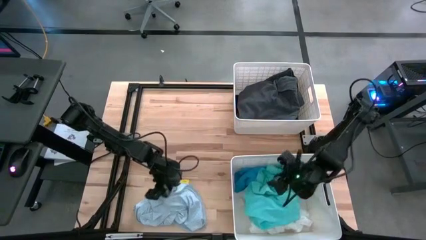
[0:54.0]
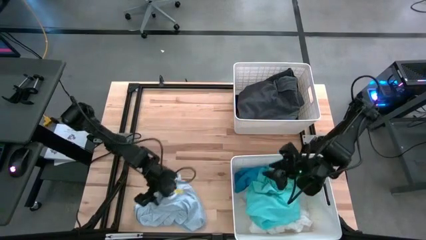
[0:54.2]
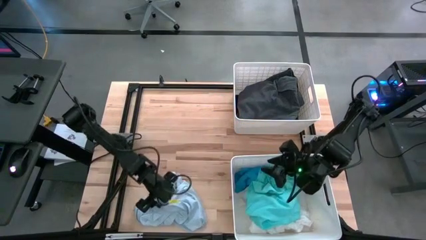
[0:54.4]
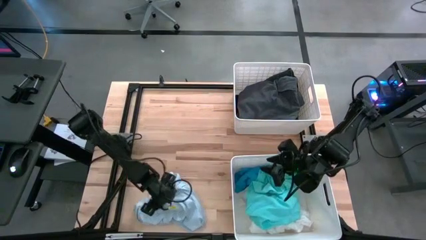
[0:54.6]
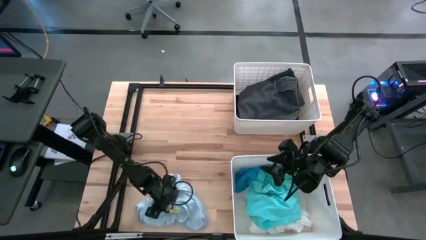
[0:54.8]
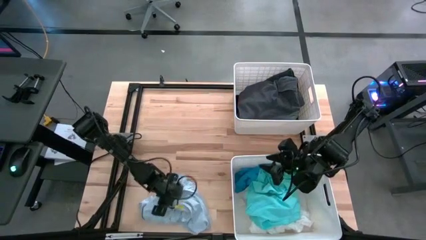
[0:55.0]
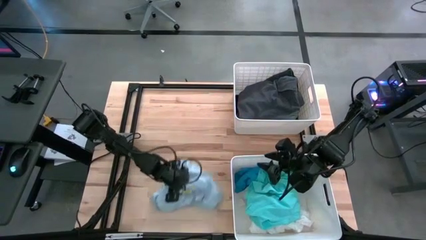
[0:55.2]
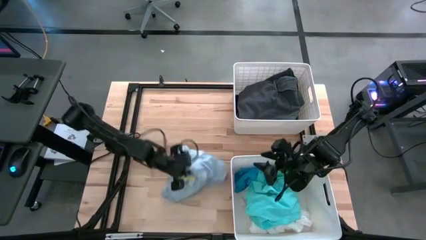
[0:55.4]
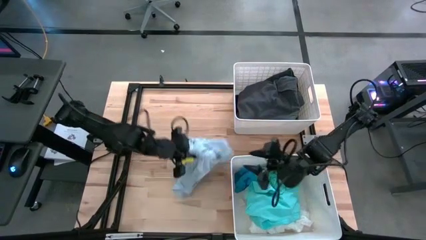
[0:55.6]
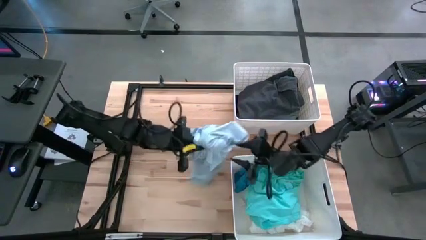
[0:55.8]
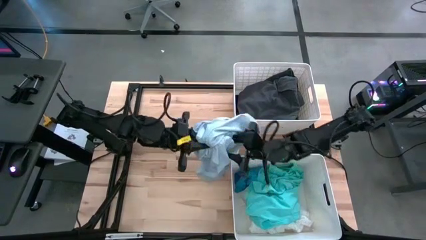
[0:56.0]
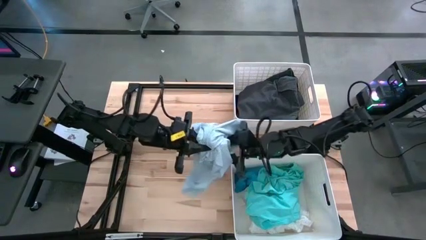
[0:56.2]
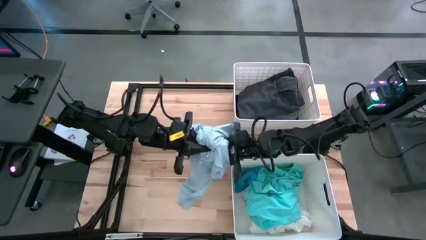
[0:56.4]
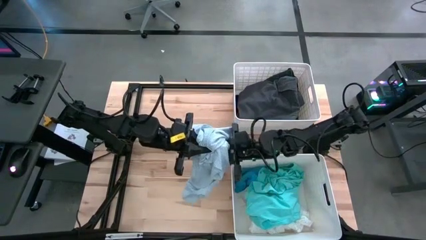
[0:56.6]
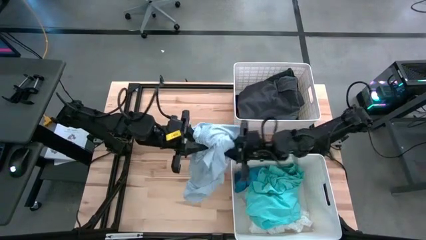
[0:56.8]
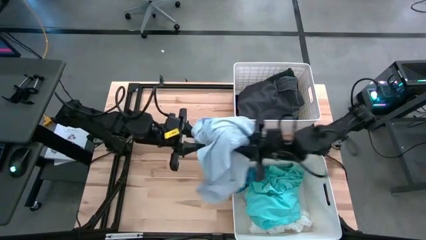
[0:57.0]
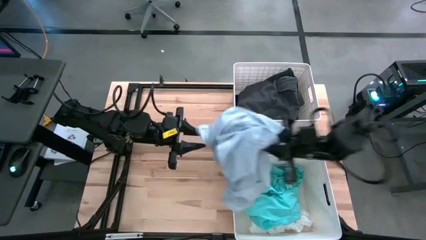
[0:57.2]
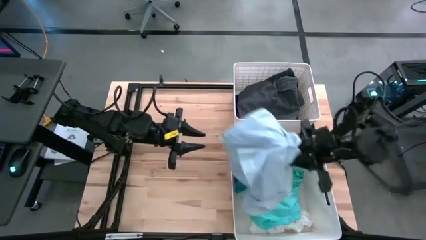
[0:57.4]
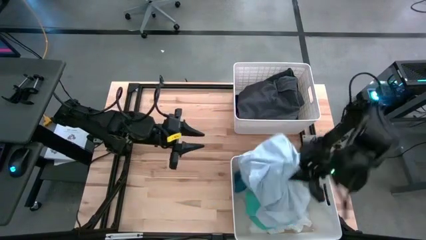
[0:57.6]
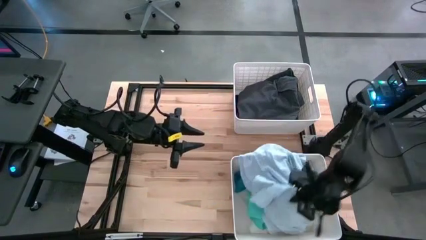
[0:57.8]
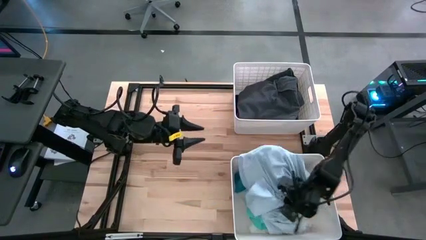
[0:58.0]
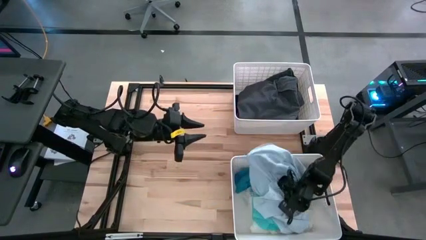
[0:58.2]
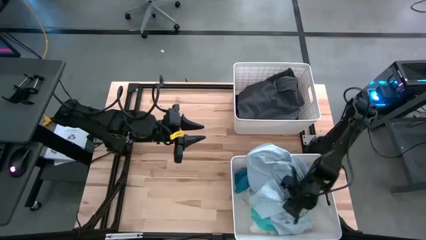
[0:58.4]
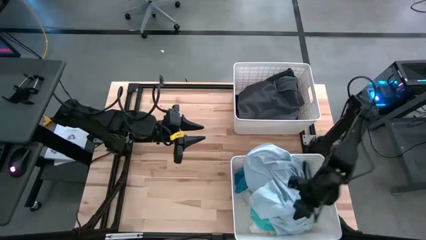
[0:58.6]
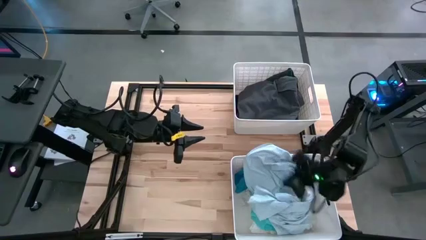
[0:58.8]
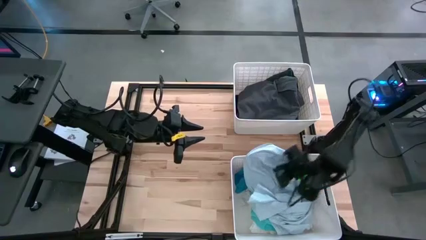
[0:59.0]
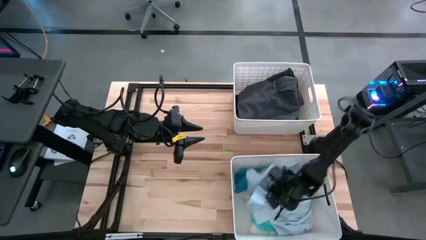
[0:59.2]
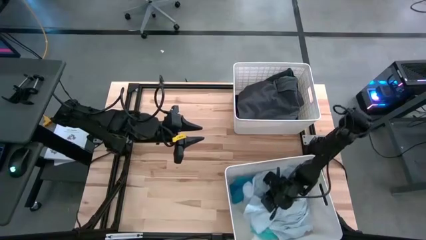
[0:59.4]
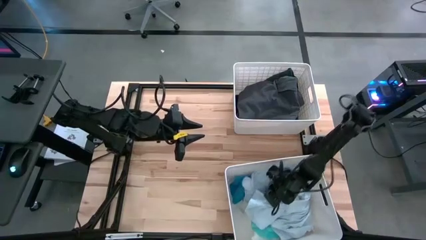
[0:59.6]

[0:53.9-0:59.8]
Task: Sort clothes
Put the white patient gown into the bottom white laundry bin

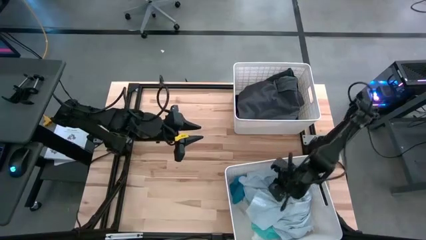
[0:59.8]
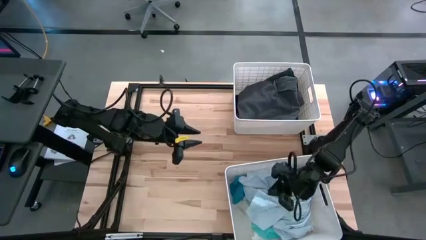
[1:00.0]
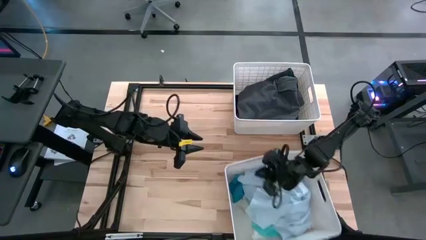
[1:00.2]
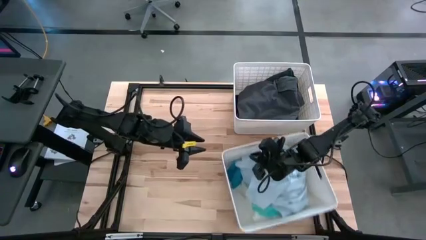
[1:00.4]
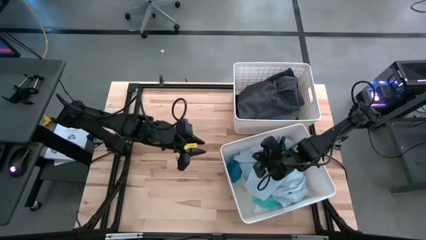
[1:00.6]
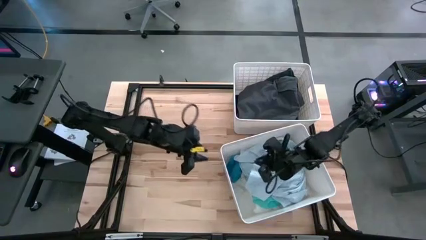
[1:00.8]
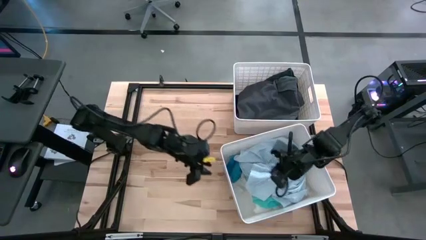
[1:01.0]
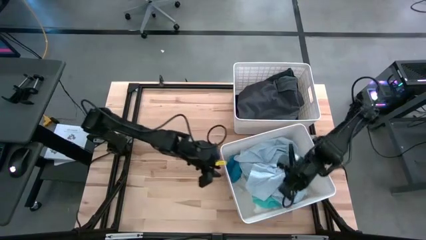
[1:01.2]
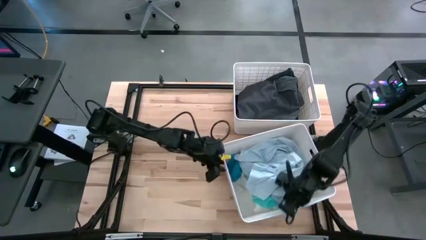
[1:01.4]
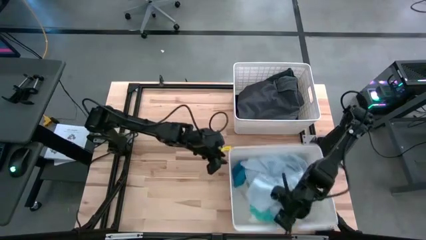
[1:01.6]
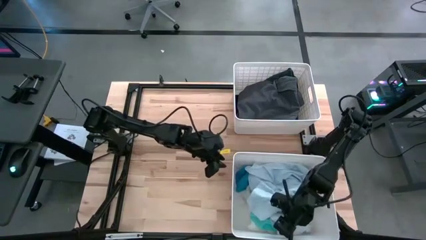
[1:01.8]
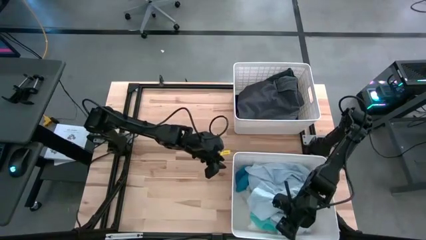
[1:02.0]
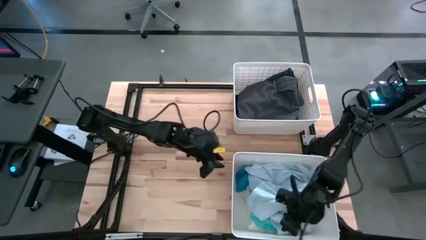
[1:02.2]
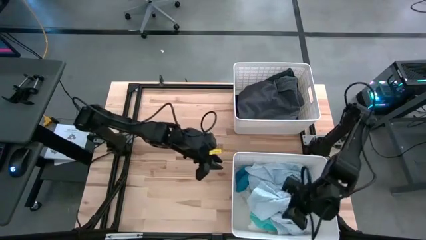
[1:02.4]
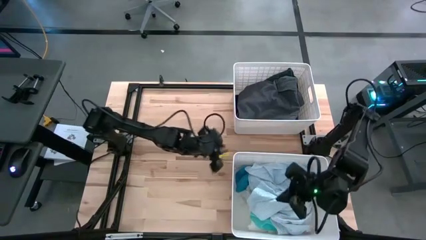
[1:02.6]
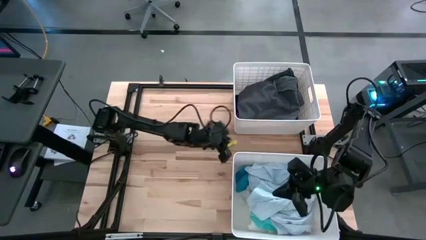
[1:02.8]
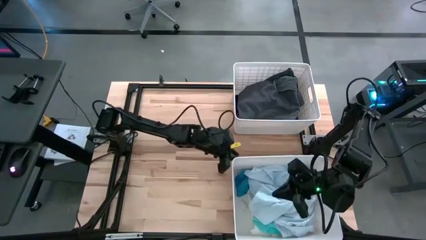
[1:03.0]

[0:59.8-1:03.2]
Adjust the bottom laundry bin

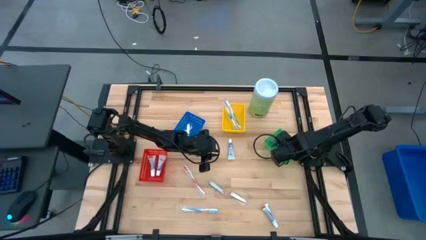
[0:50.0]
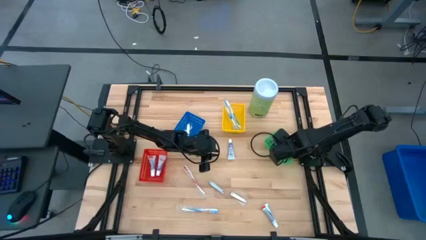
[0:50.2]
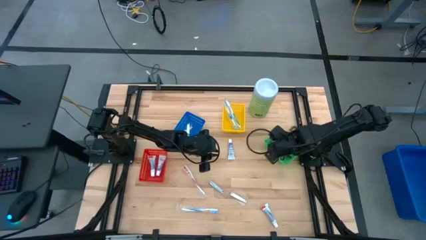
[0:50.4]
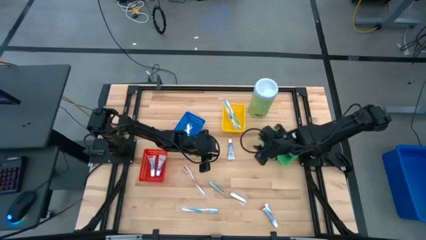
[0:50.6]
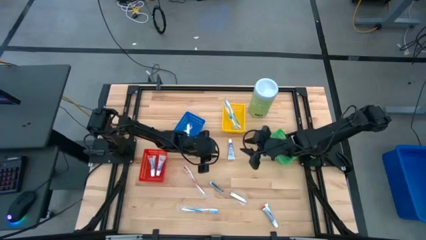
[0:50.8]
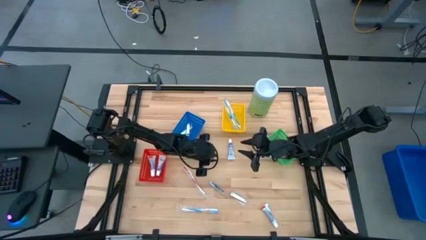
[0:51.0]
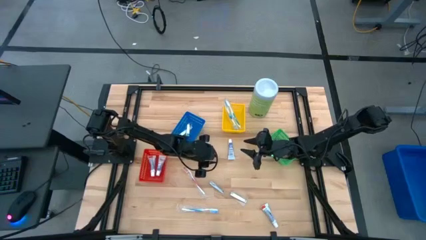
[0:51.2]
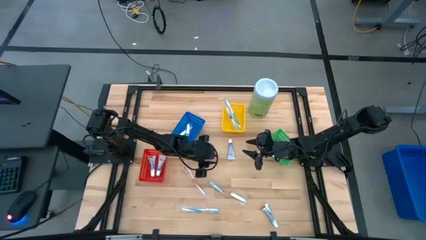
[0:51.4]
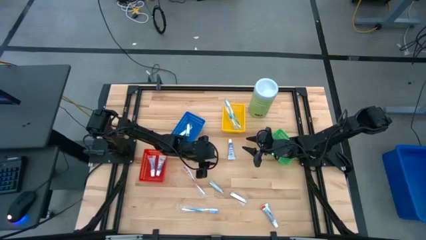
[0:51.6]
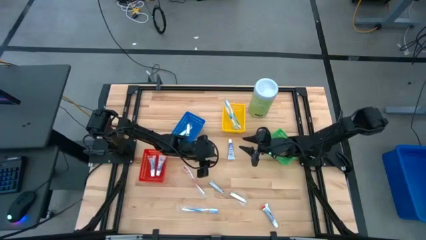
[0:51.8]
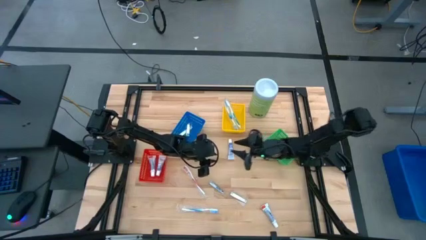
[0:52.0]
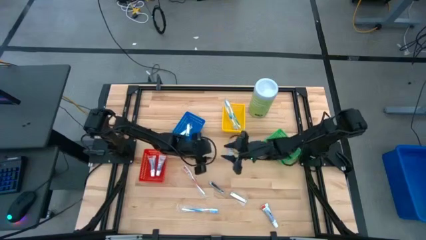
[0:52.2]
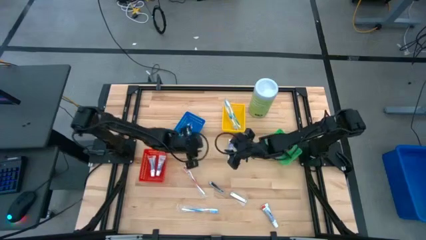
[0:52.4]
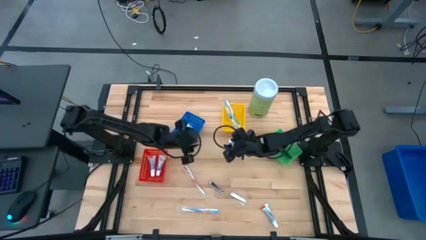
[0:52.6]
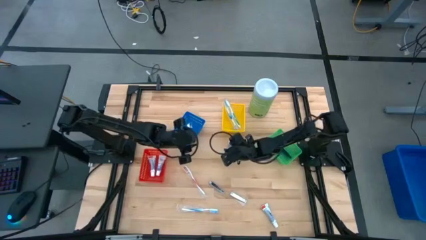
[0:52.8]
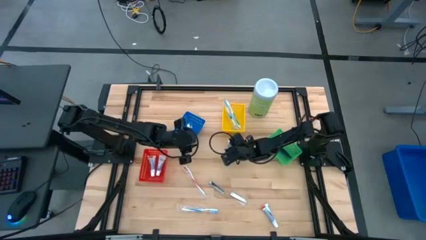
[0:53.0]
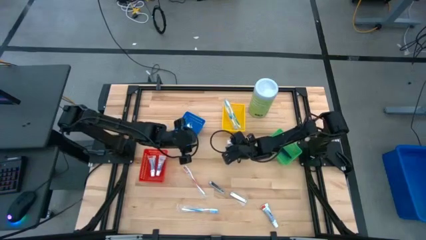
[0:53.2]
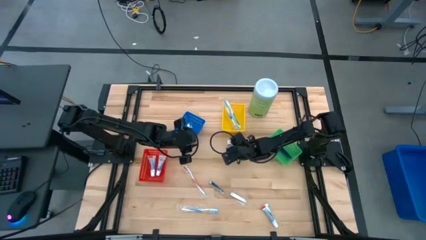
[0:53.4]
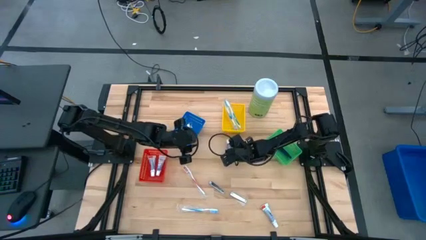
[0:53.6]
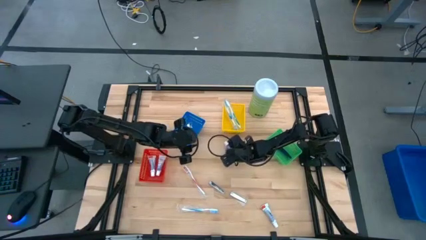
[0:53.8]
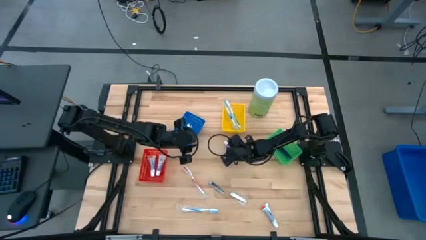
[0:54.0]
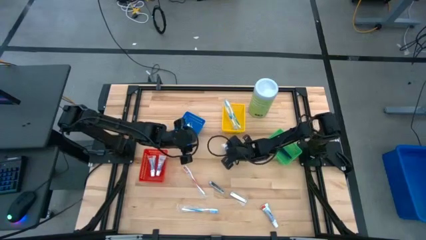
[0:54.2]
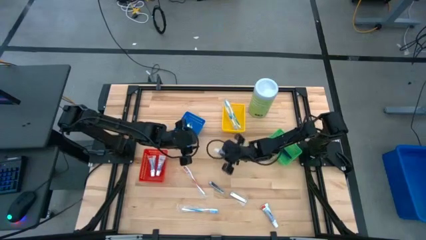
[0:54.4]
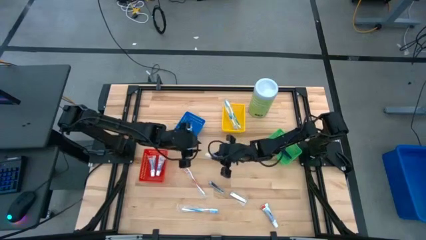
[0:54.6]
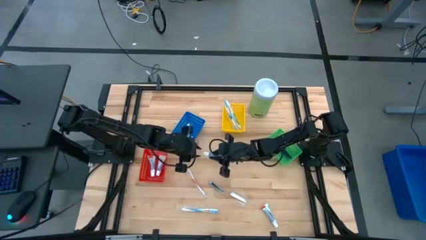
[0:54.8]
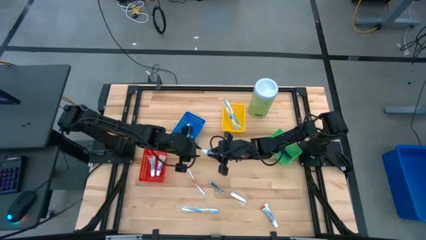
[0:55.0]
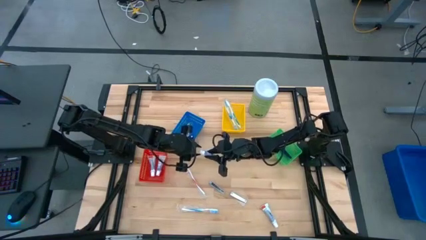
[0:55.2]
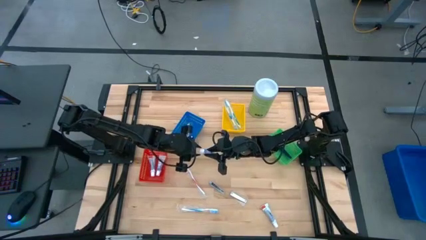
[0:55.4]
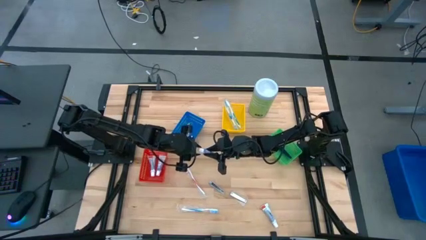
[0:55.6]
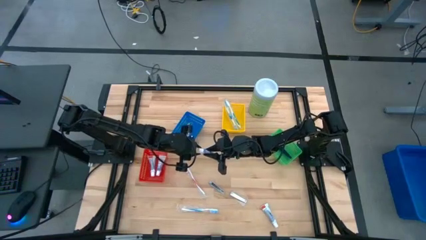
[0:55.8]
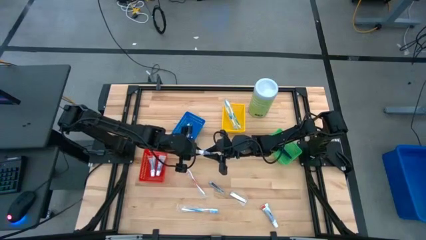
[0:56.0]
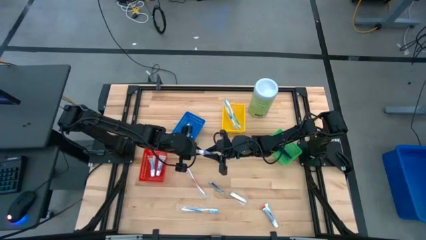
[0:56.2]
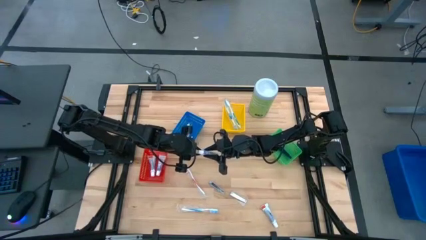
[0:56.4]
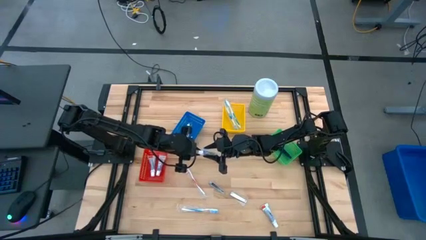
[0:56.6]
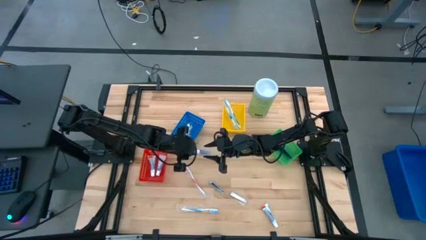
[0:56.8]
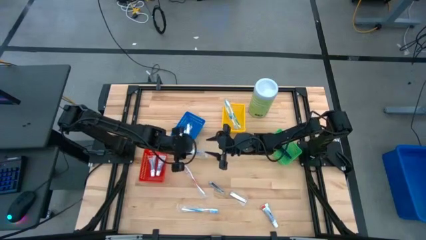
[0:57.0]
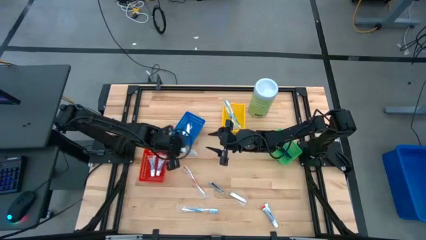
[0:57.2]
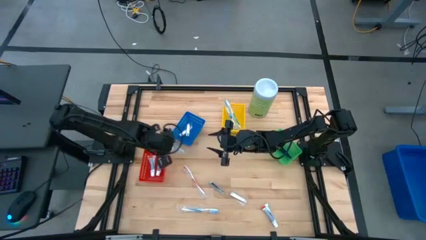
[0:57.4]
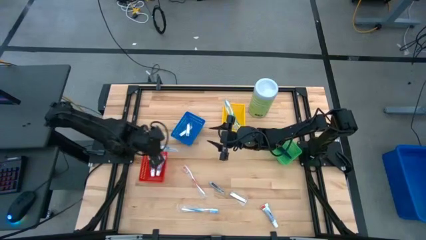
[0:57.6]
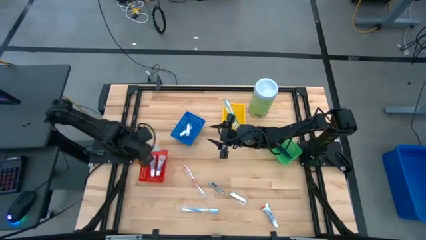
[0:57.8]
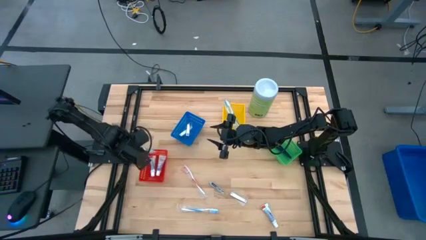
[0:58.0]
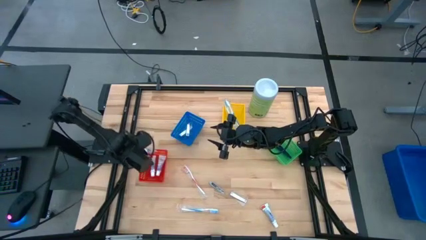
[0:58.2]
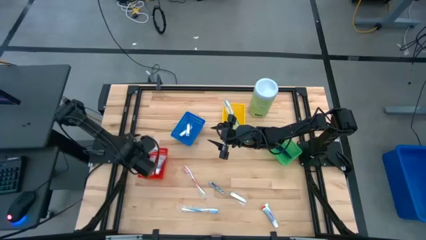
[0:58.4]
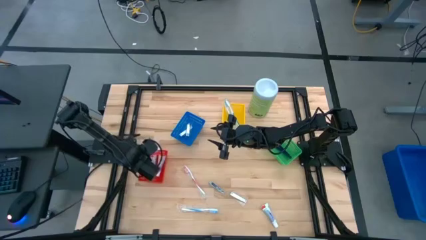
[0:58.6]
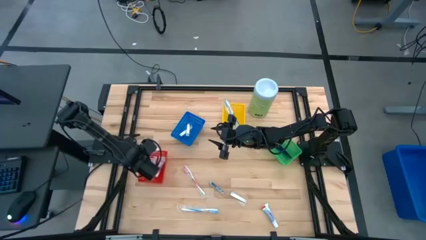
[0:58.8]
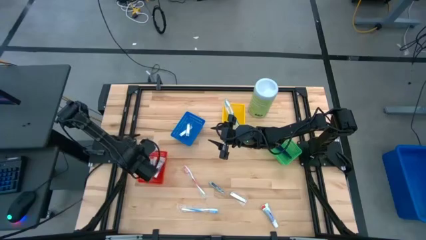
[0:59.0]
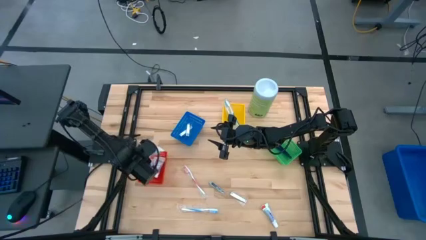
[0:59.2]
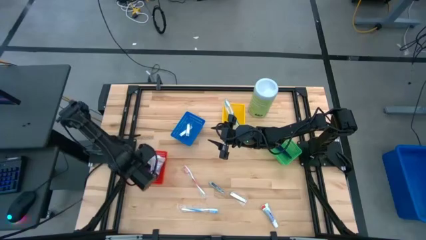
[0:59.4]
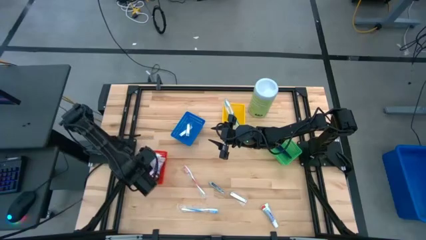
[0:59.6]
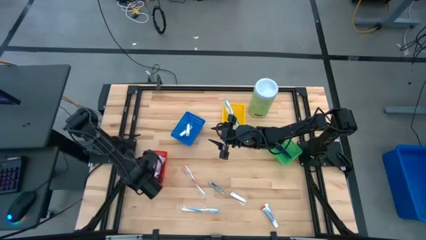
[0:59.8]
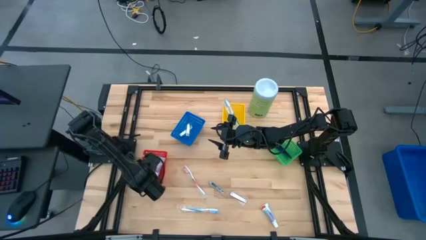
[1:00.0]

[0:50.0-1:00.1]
Task: Pick & Place Travel size toiletries
Put the white toothpaste into the red basket
